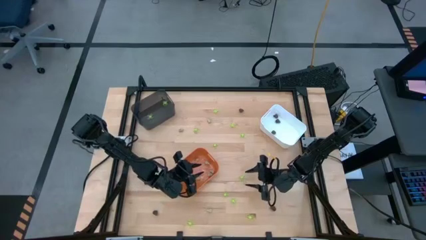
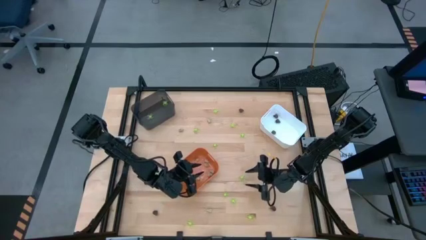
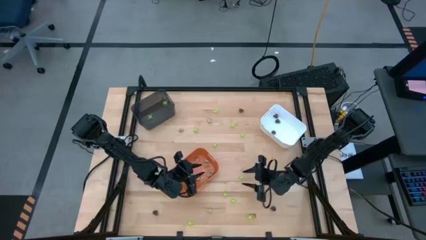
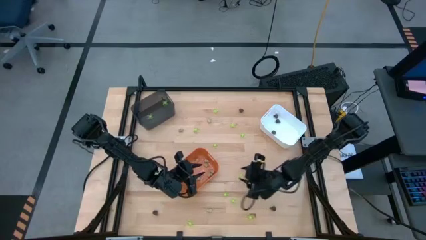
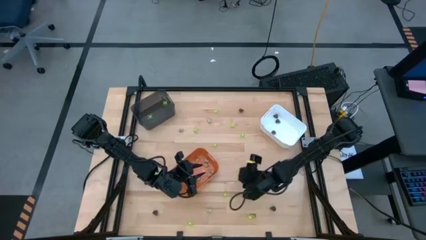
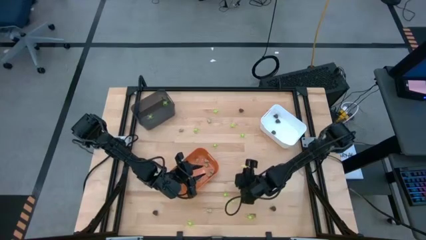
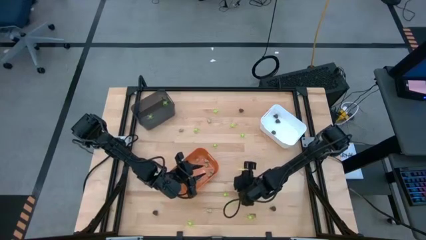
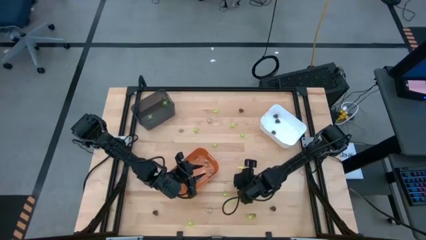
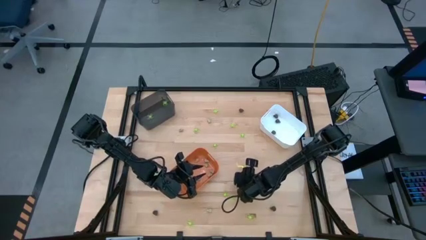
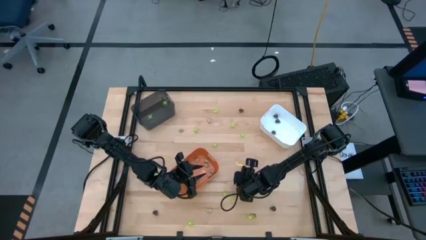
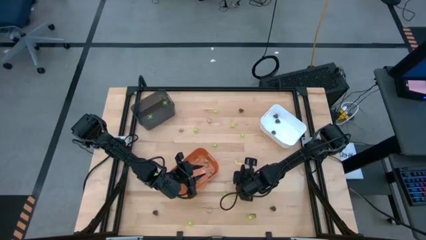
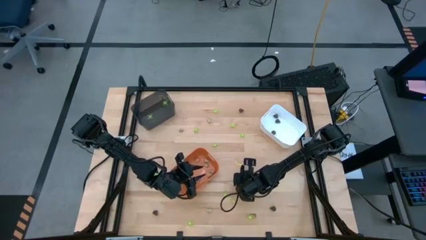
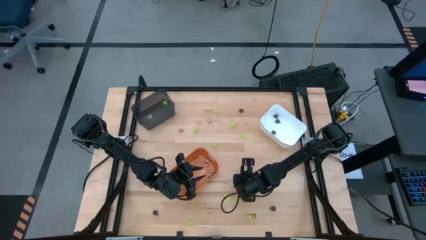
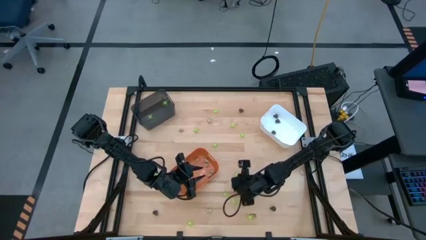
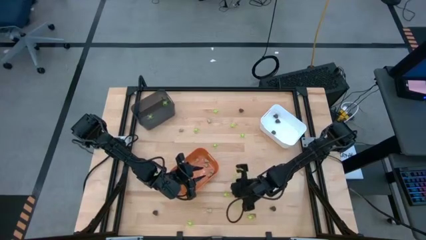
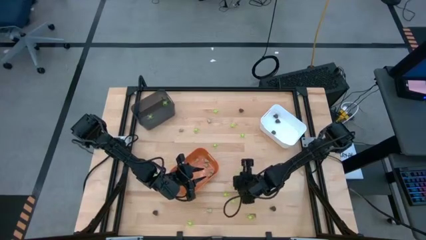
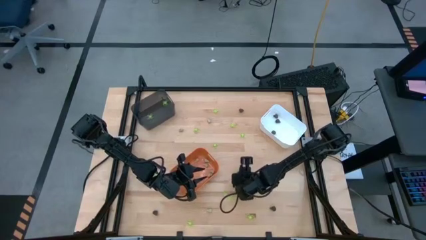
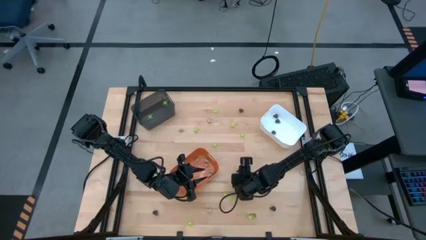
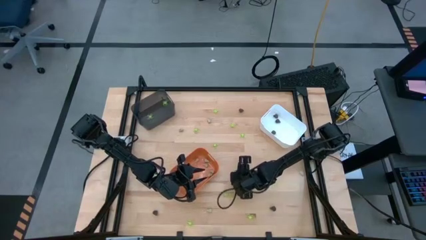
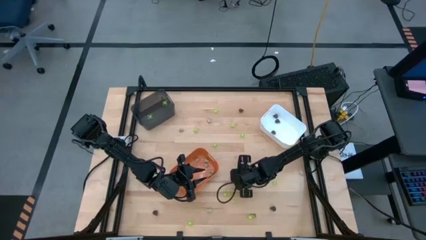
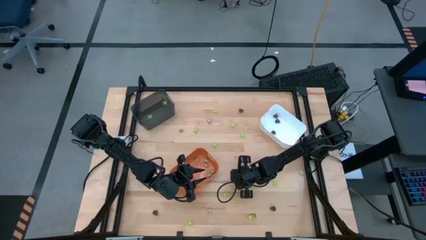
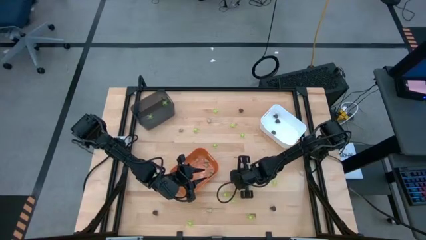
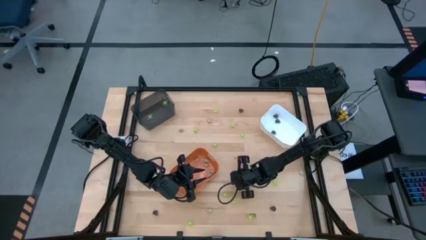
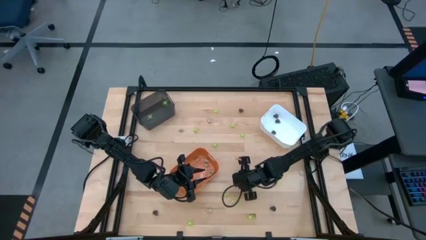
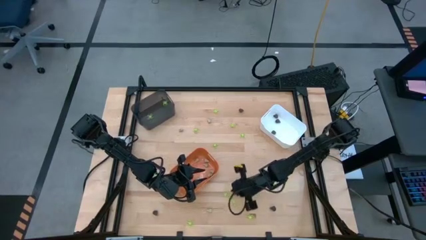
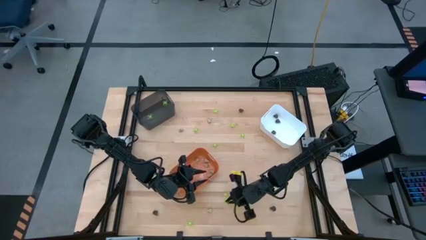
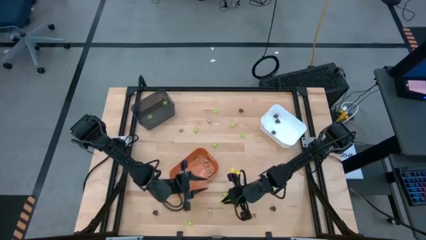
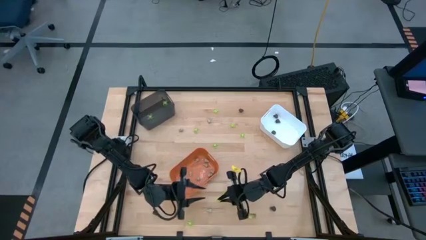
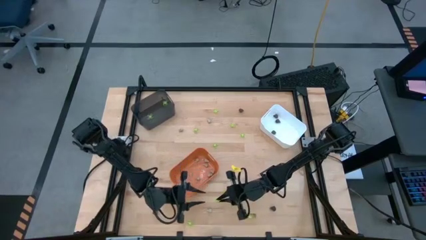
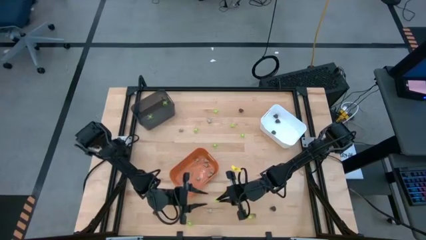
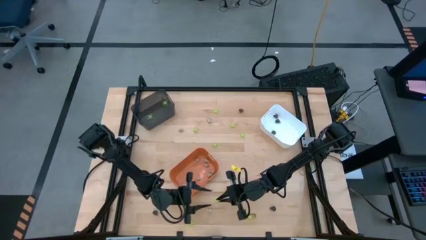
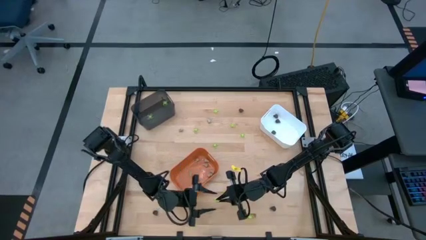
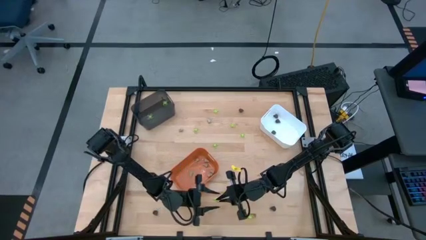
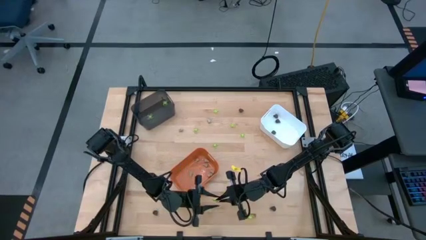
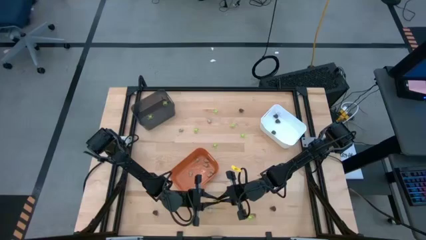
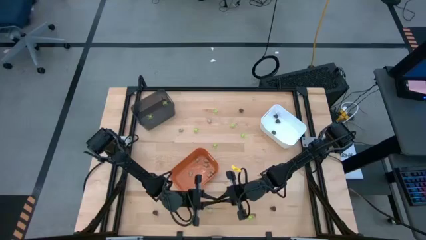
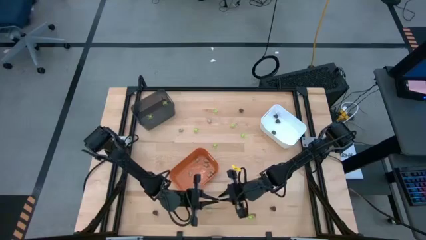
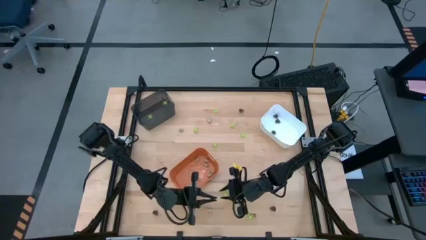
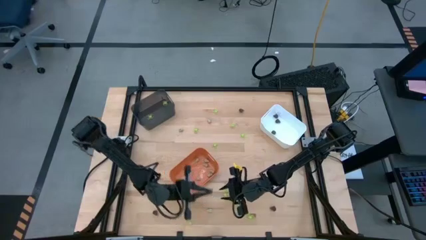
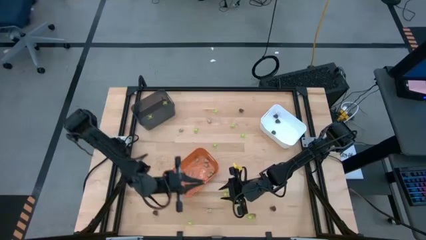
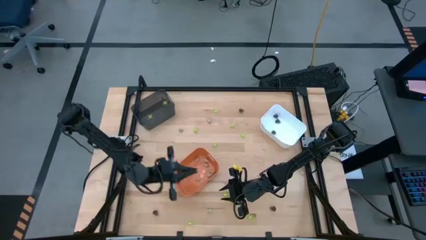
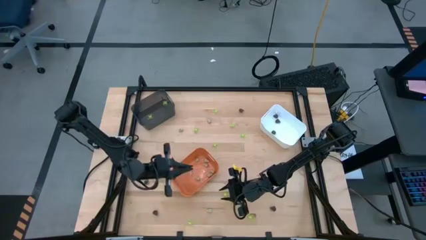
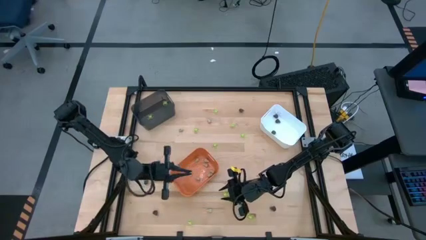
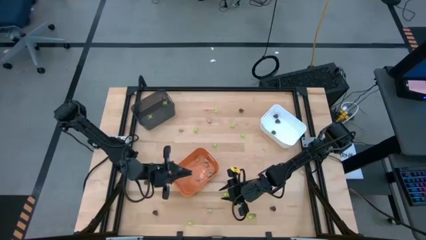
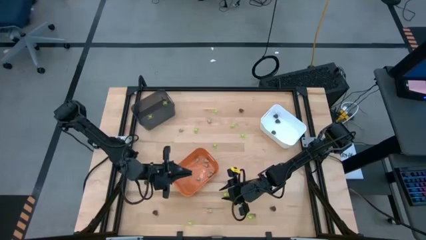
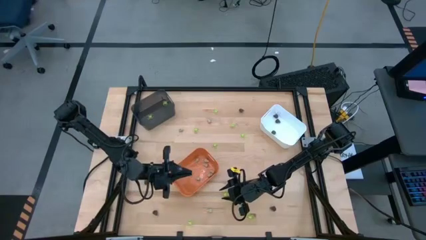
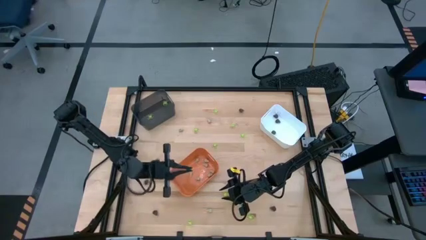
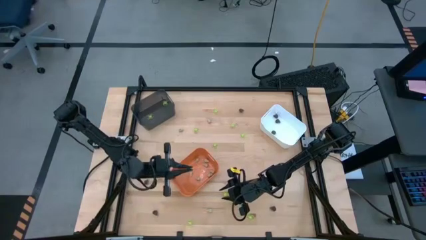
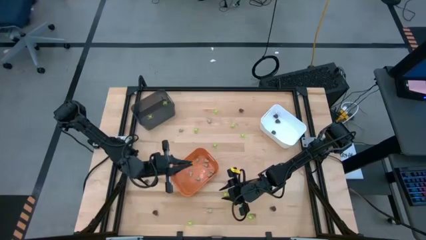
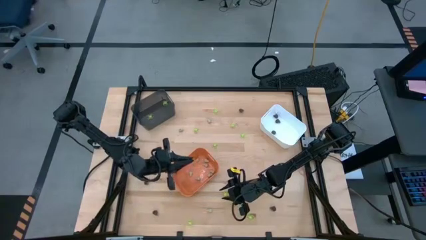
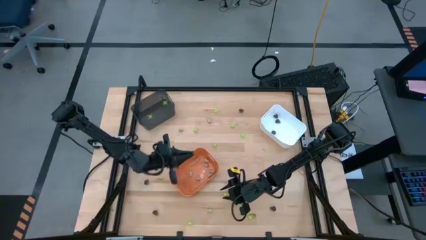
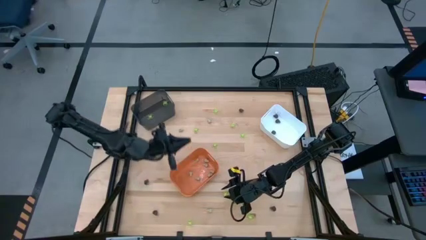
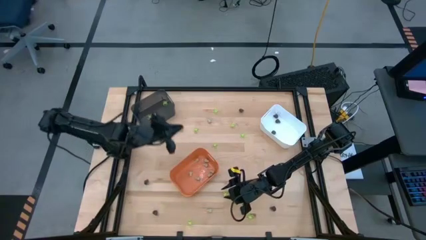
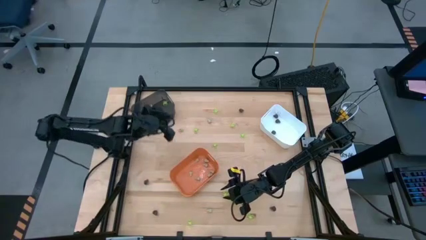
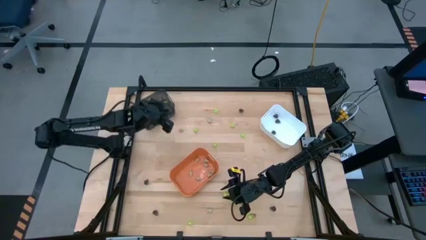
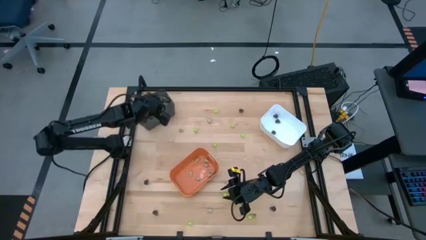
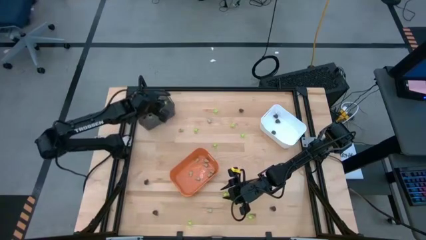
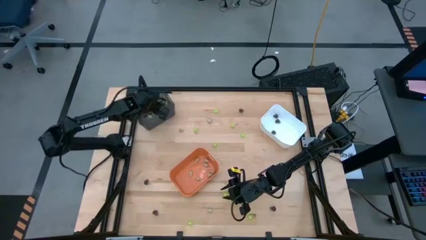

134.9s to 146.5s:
Task: Sort Halloween decoration
Put the green spider toy into the black bin

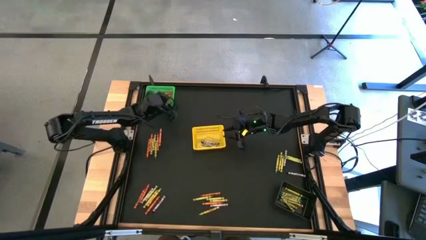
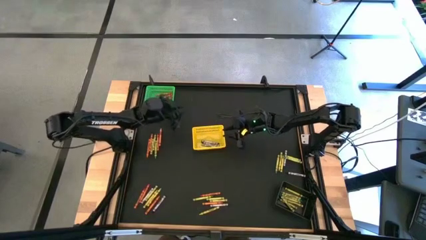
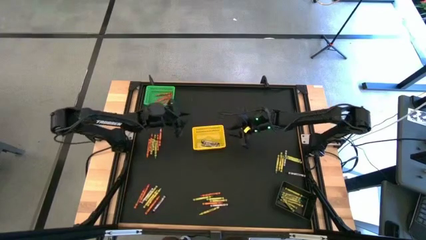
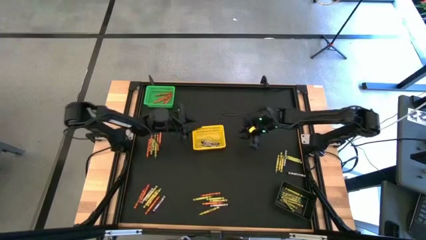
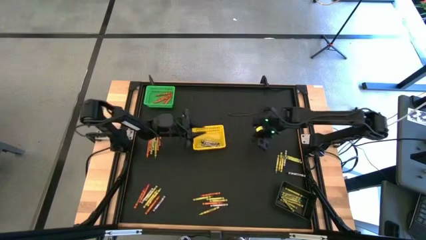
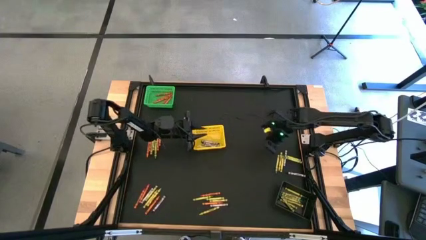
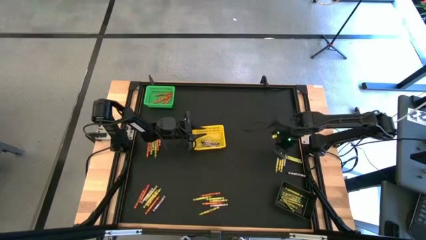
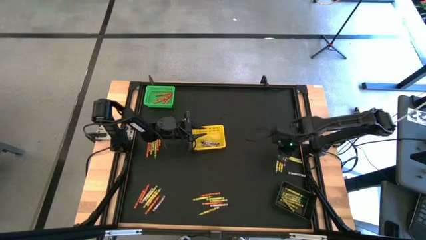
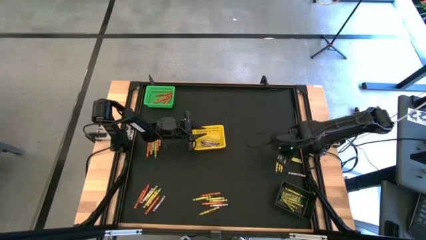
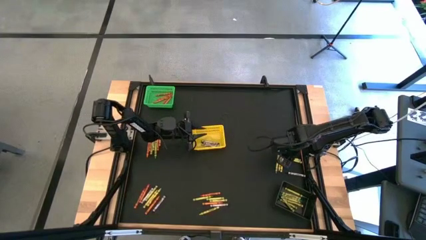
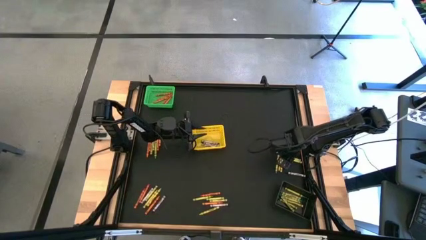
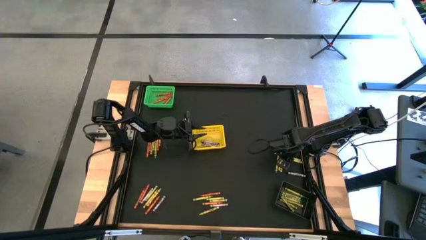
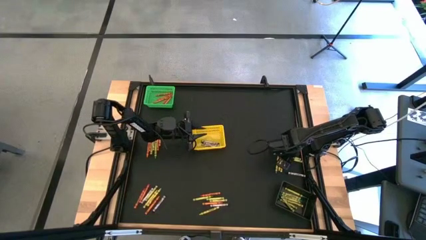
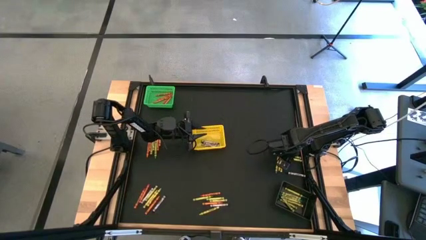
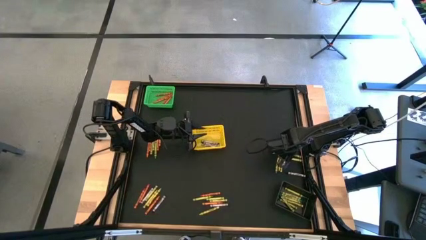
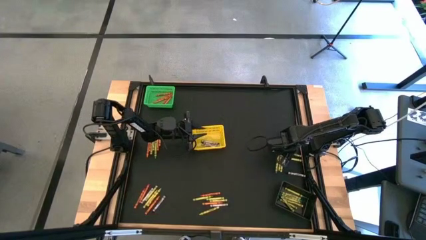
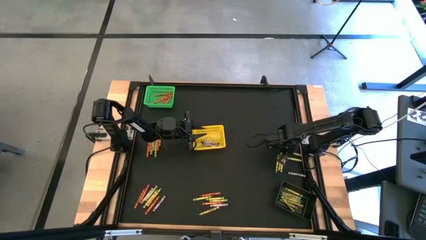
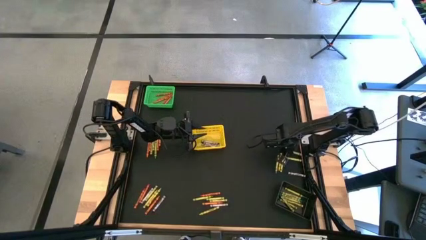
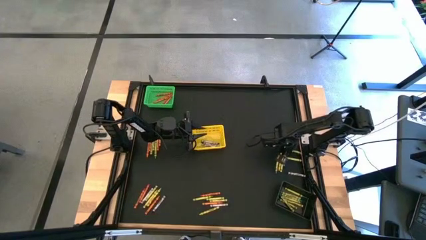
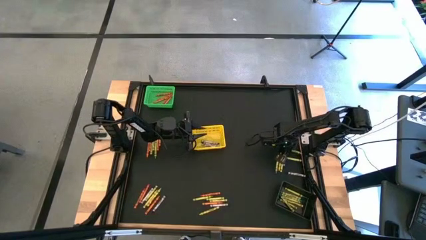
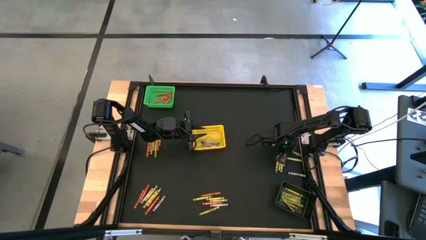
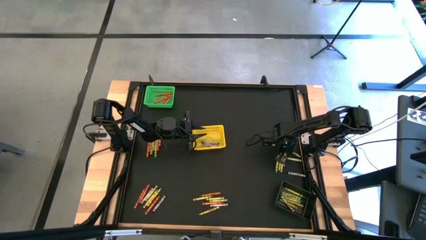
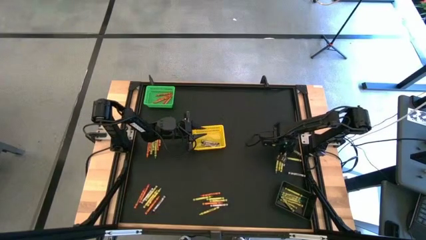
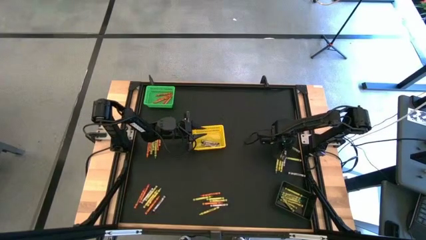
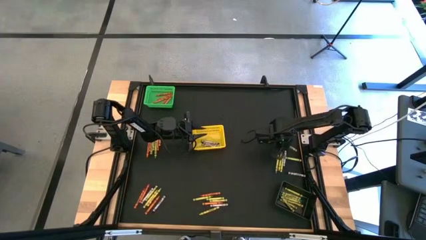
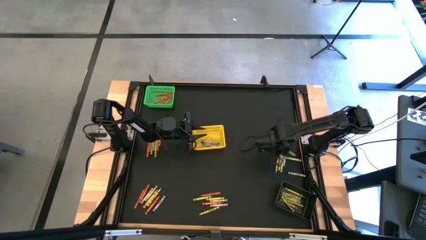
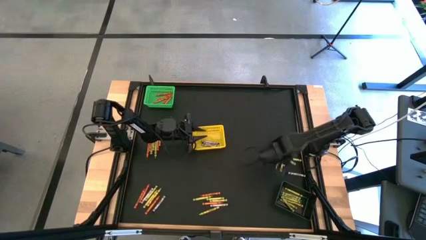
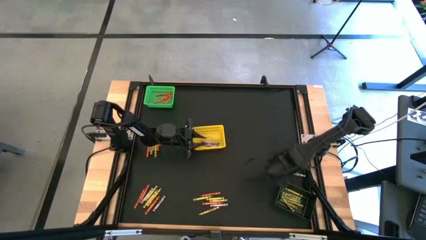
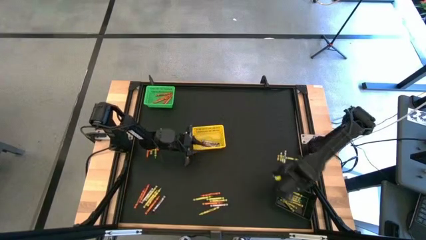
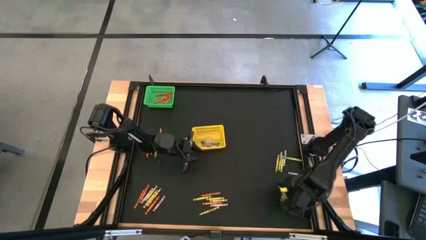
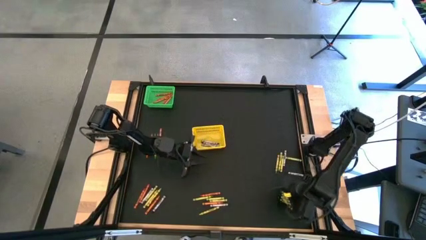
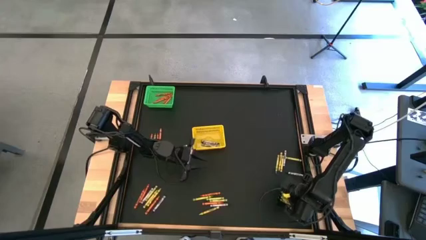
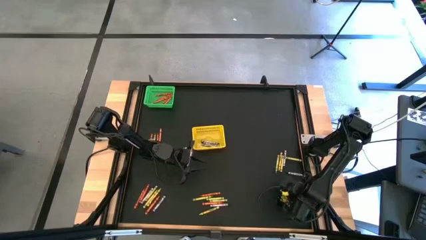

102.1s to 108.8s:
Task: Sort crayons
Put the green crayon into the black bin
